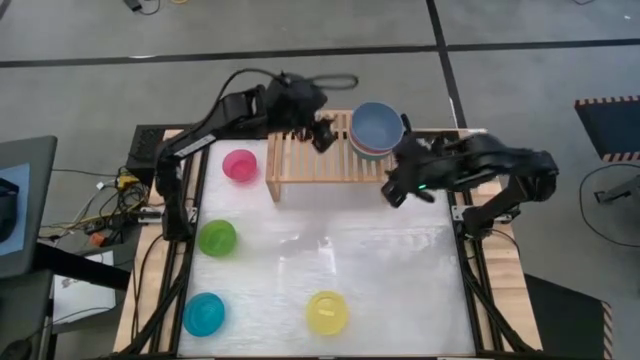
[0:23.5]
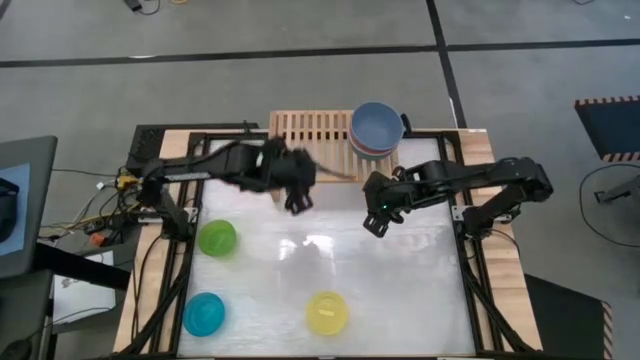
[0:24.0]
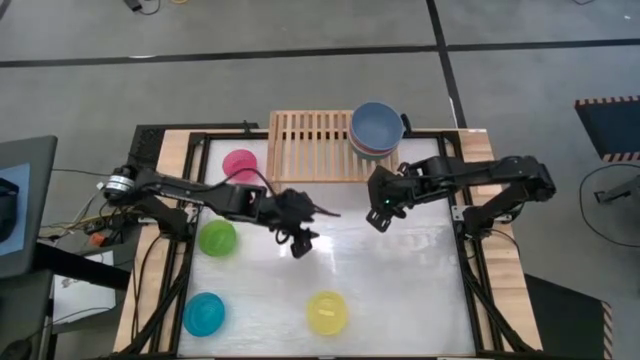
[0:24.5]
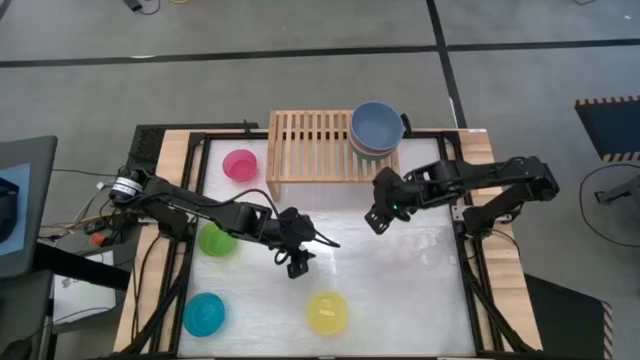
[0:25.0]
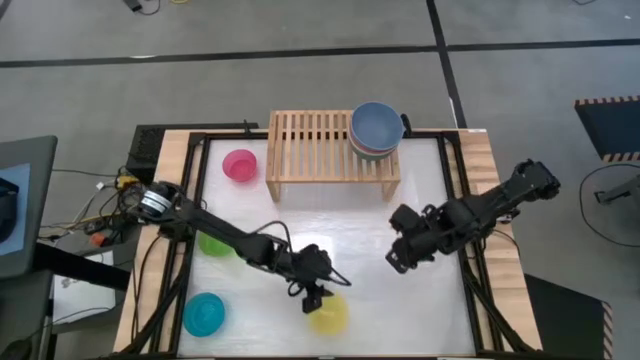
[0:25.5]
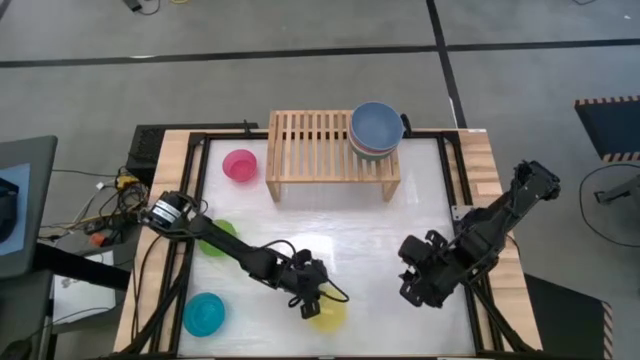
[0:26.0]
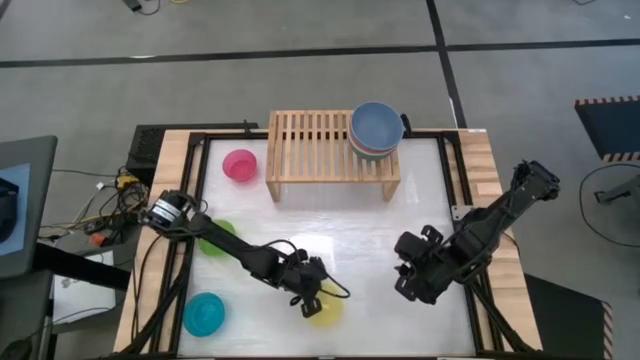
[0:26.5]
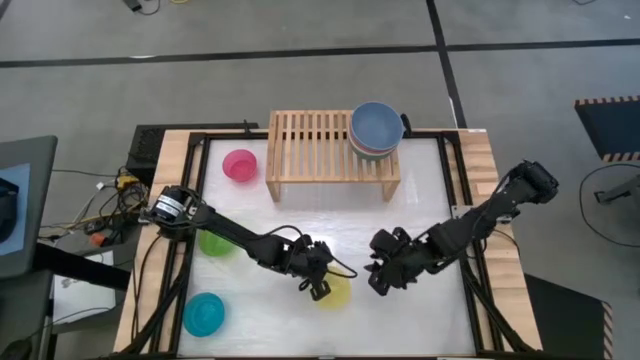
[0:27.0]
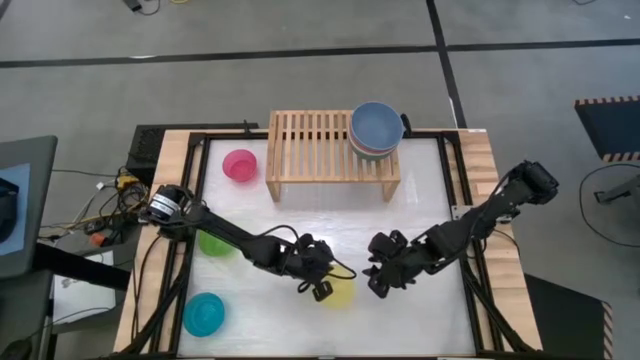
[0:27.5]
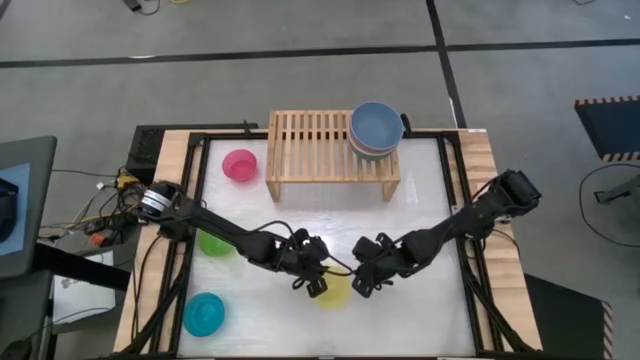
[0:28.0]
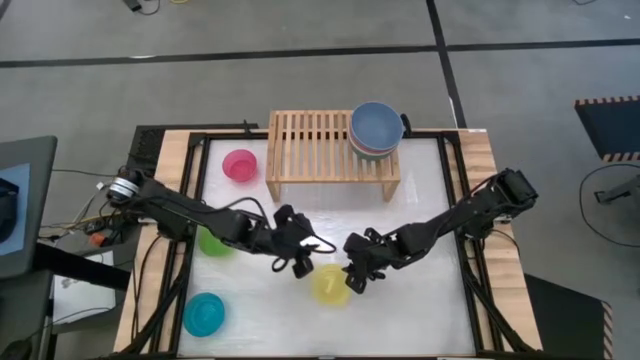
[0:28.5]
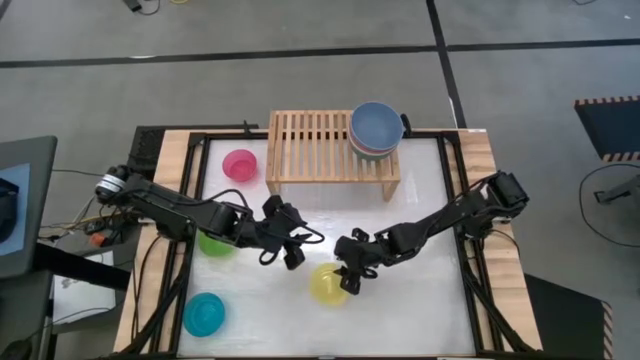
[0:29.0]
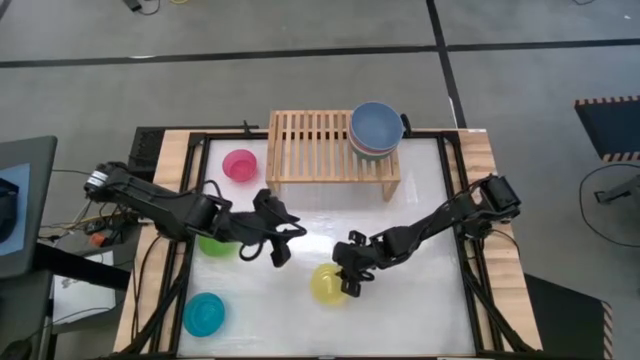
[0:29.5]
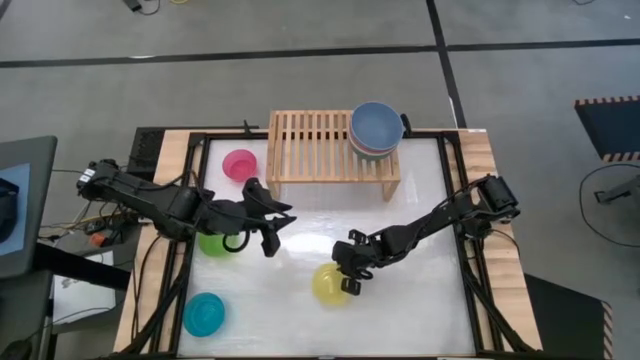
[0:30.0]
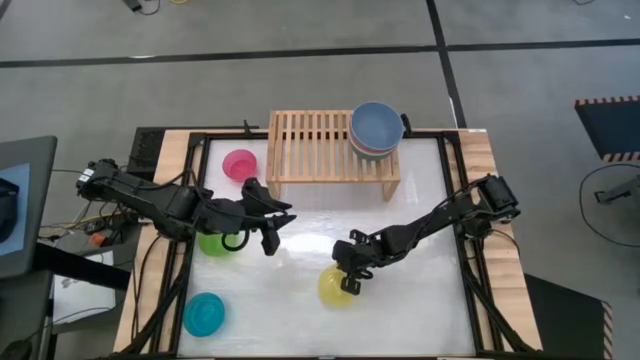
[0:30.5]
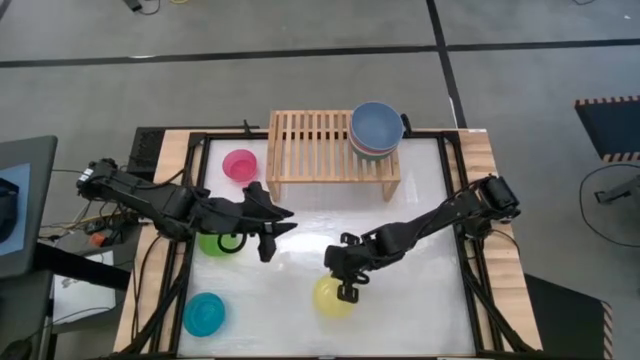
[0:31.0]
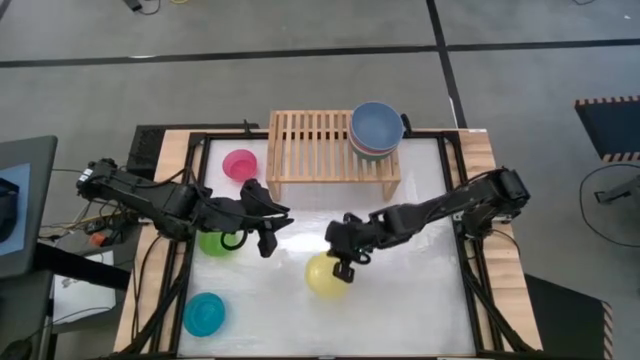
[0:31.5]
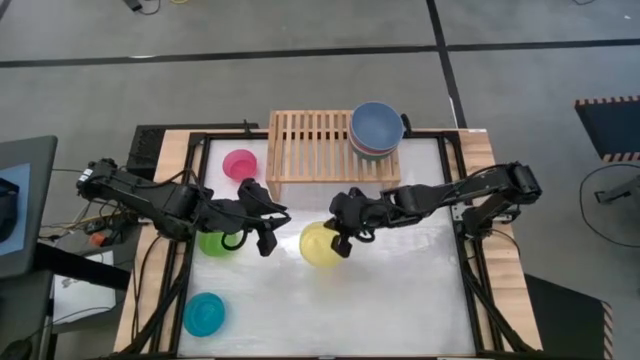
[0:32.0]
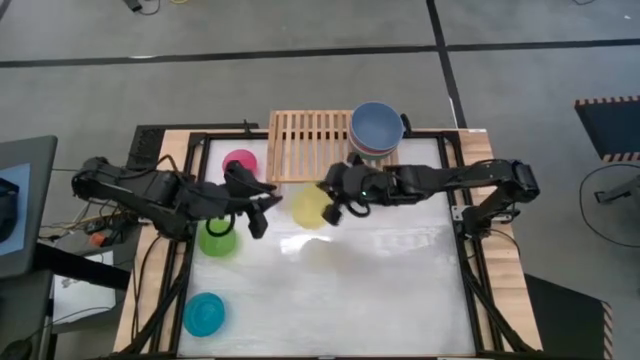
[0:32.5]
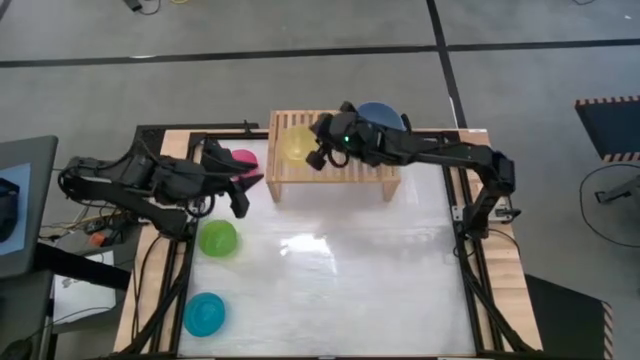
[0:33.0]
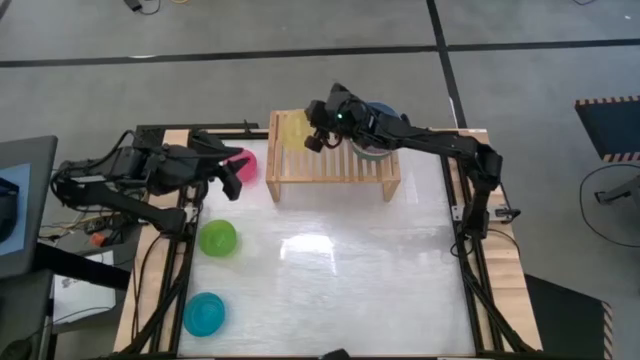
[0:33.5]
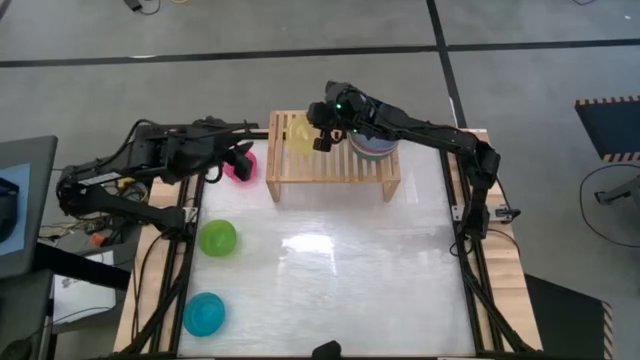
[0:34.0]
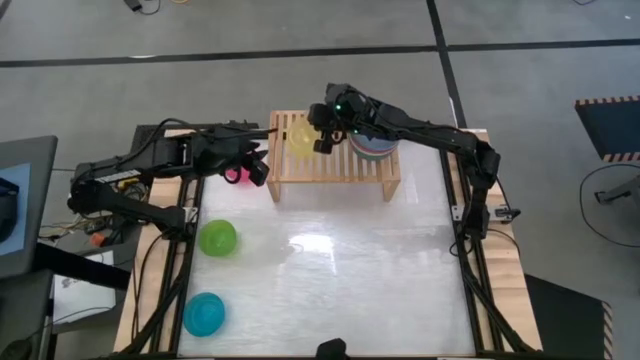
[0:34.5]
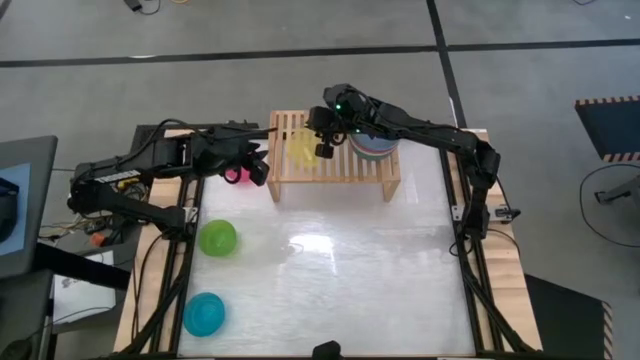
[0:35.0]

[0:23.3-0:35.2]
Task: Place and stack bowls onto a shelf
Put the yellow bowl on the shelf

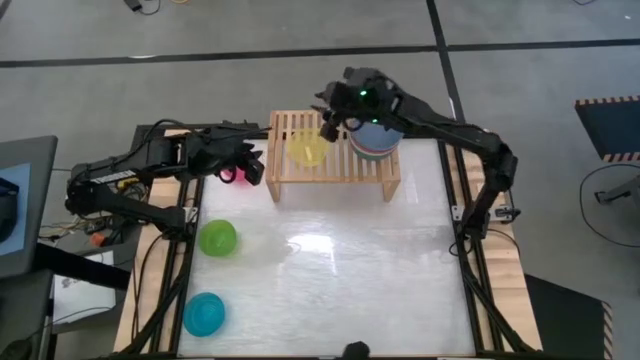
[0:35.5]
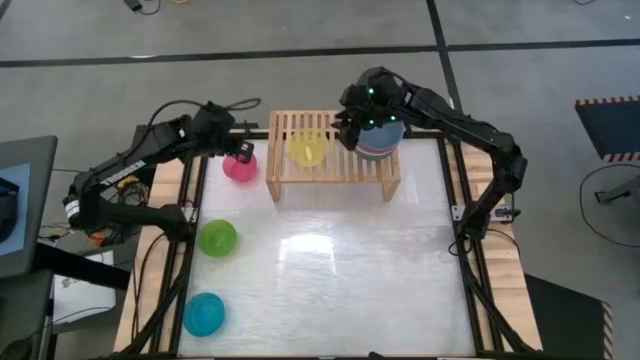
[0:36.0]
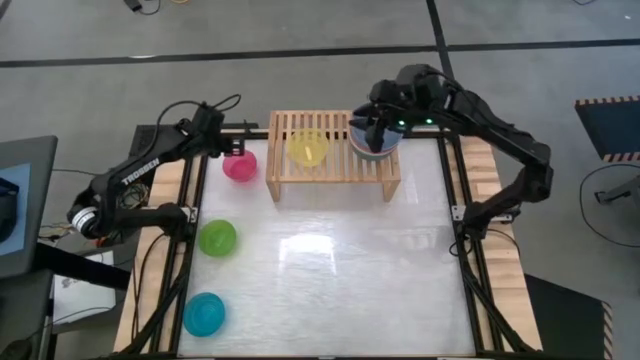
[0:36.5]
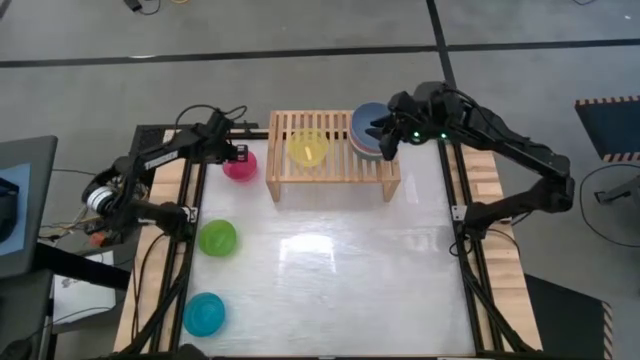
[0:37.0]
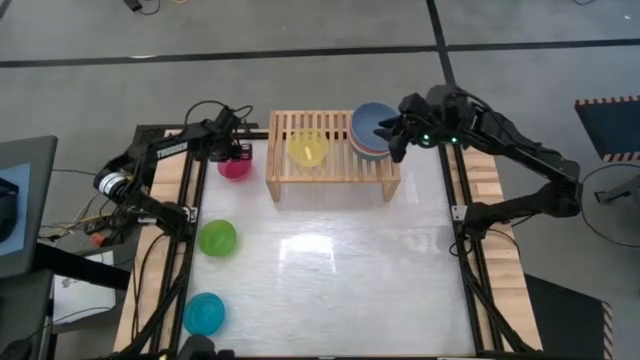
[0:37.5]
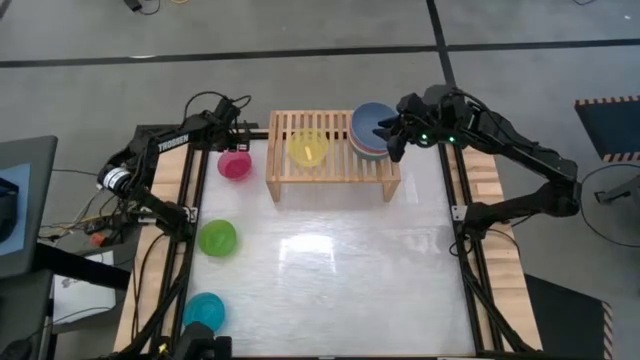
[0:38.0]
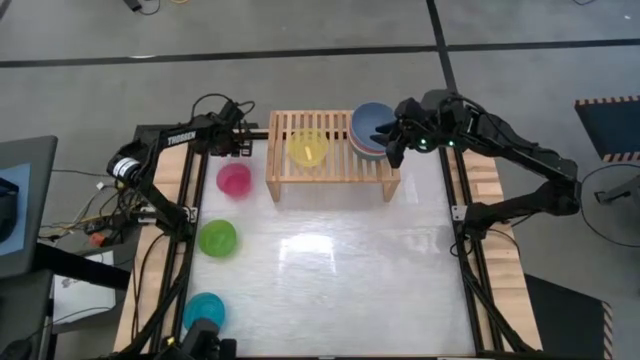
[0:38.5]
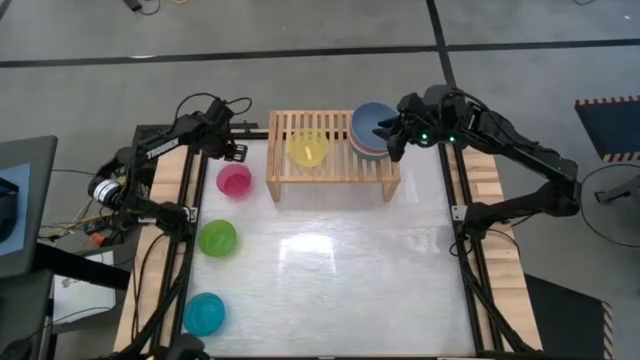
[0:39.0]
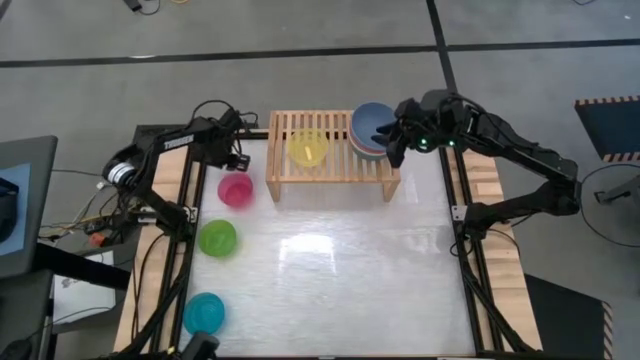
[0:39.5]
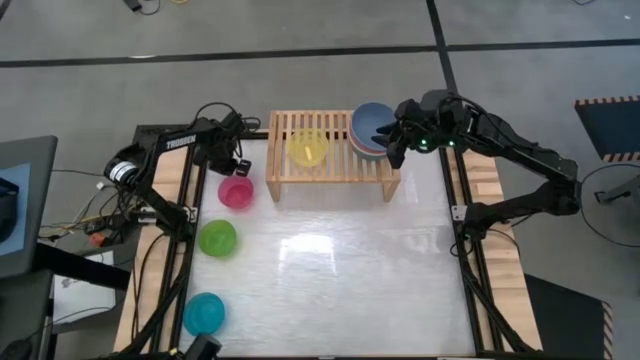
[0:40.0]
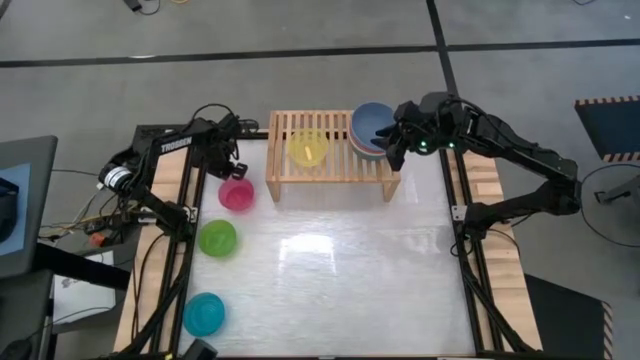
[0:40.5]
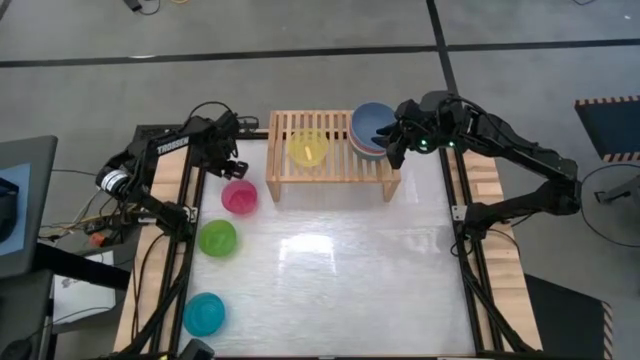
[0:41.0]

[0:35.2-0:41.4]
Stack the pink bowl on top of the yellow bowl on the shelf

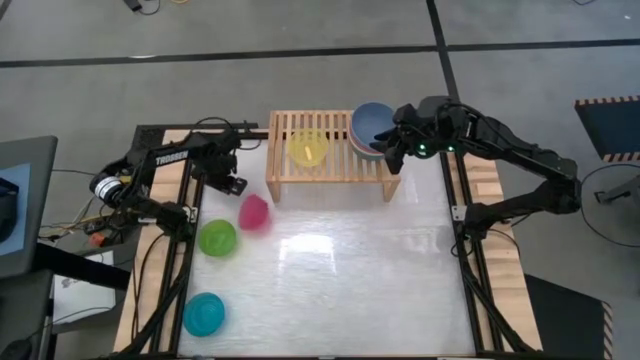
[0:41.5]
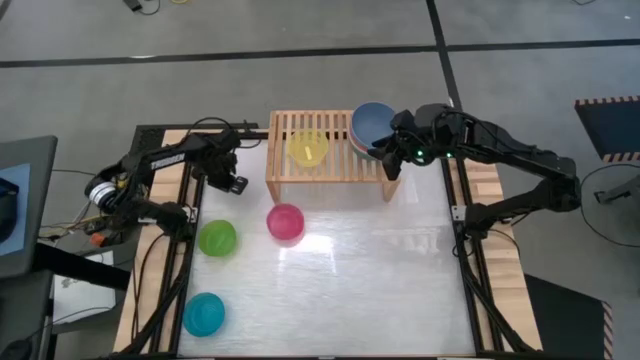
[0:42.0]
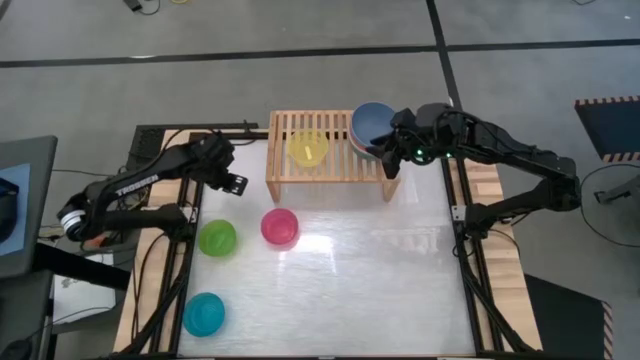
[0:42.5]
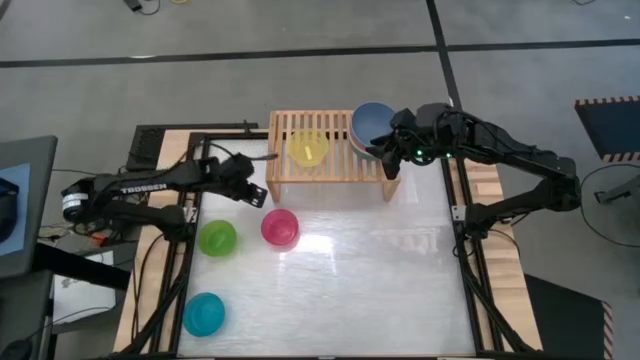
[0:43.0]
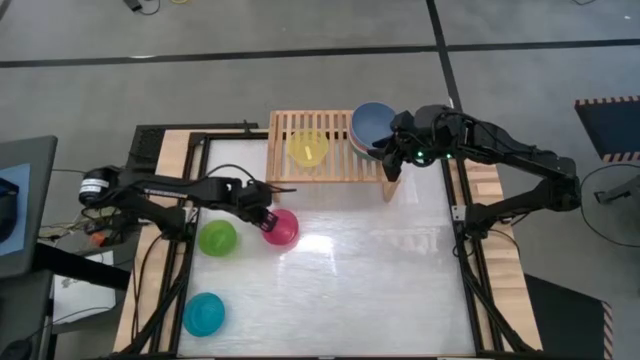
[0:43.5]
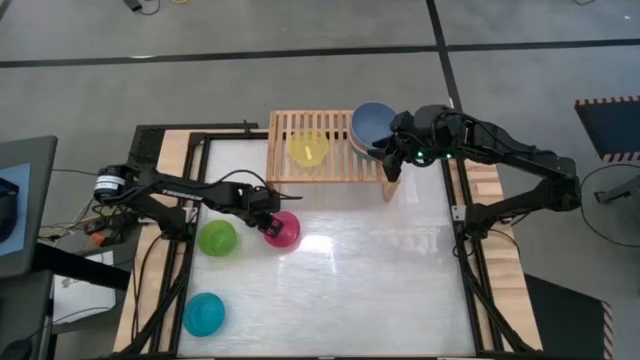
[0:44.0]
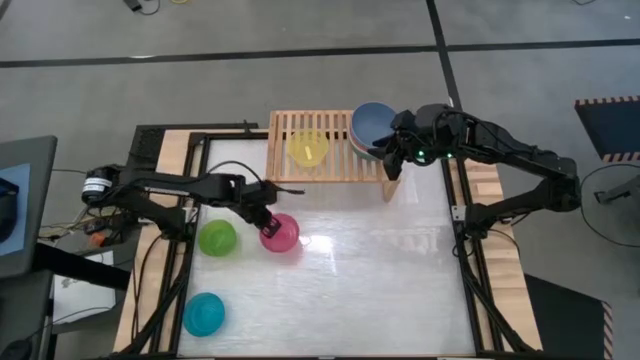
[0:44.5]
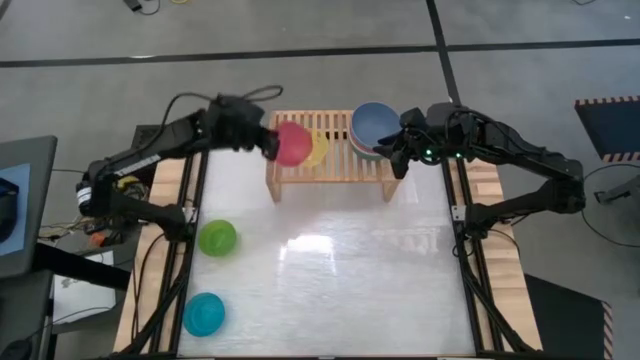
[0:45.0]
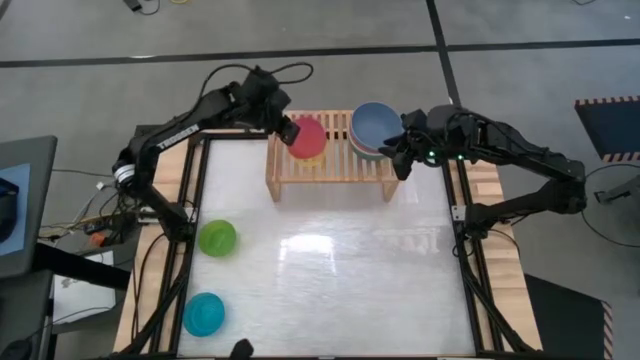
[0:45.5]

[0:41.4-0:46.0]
Stack the pink bowl on top of the yellow bowl on the shelf

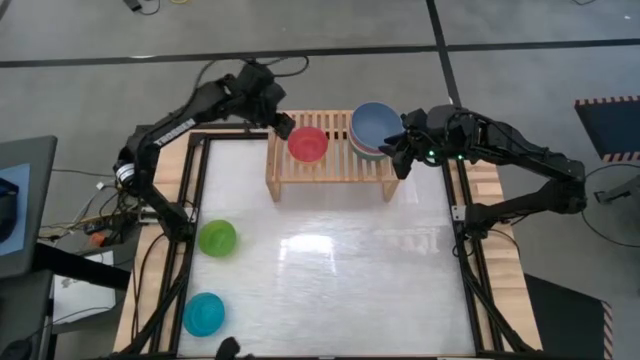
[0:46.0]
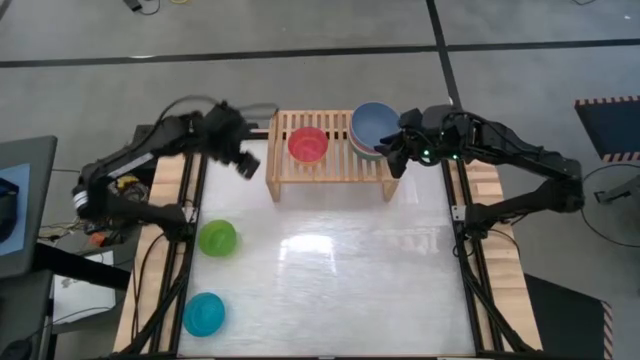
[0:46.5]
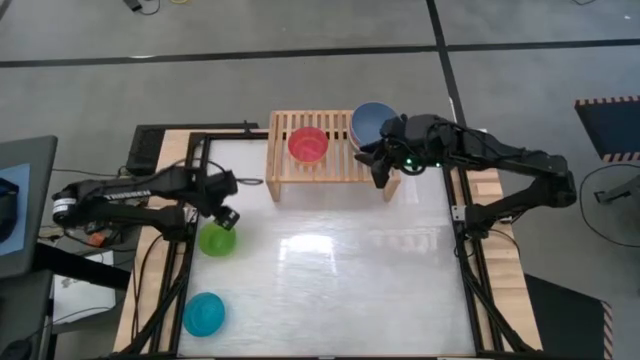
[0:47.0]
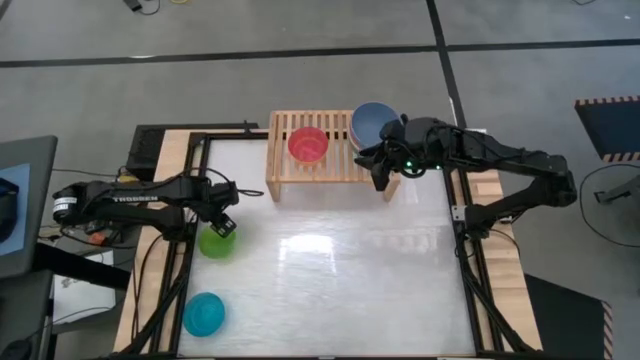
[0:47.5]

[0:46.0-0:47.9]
Stack the green bowl on top of the pink bowl on the shelf
